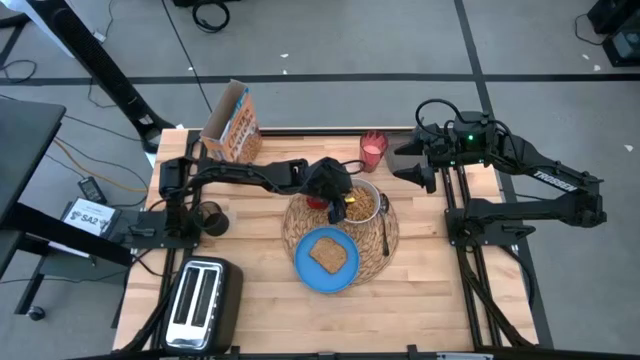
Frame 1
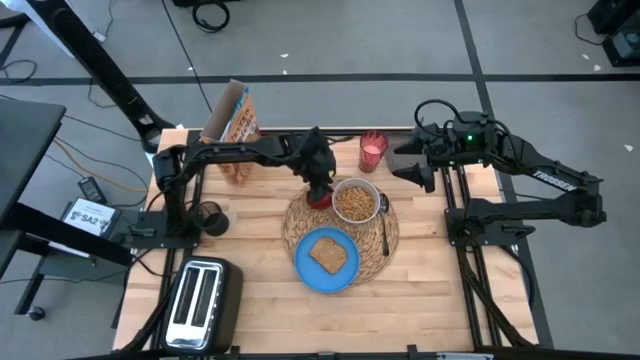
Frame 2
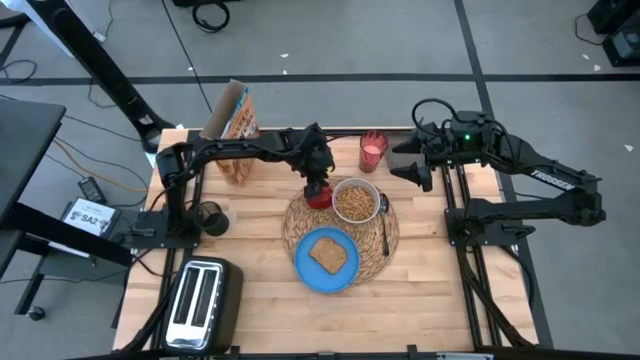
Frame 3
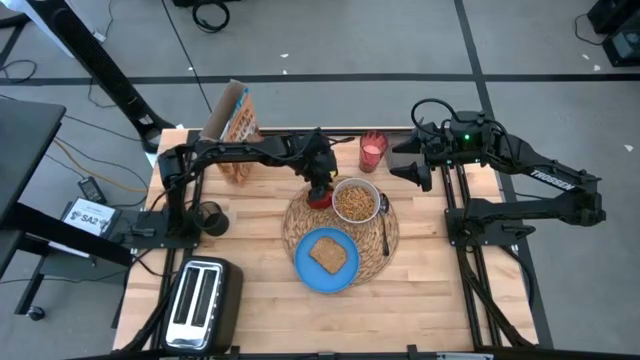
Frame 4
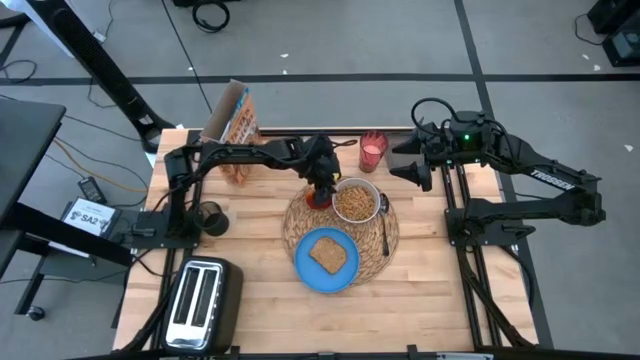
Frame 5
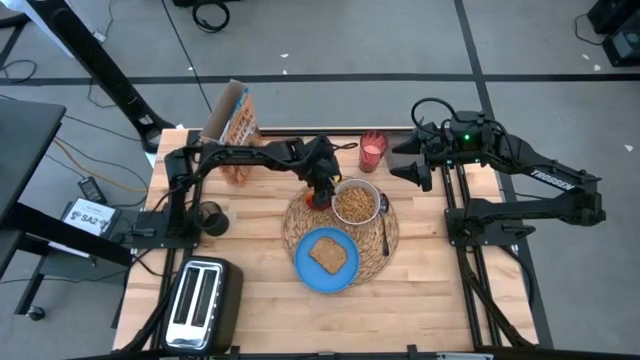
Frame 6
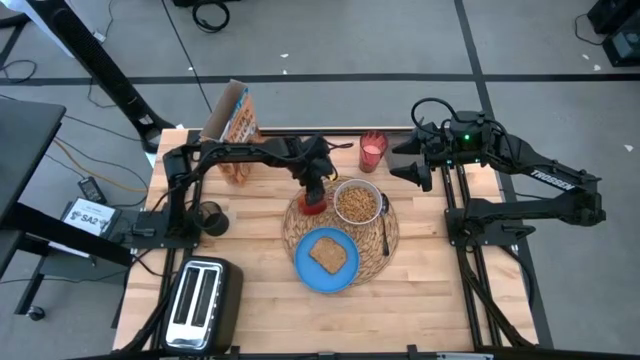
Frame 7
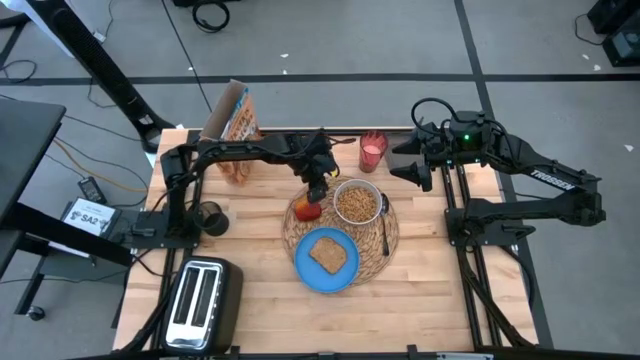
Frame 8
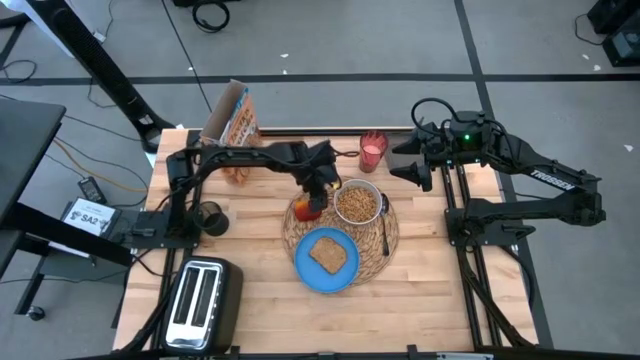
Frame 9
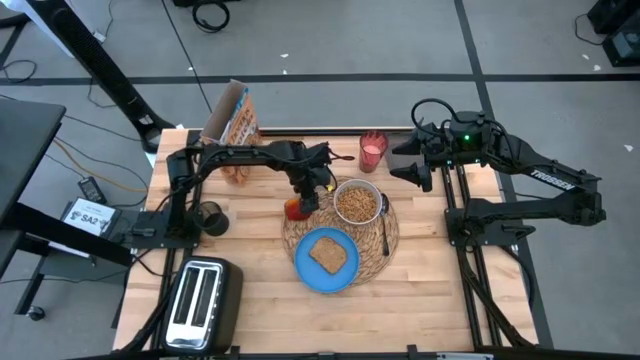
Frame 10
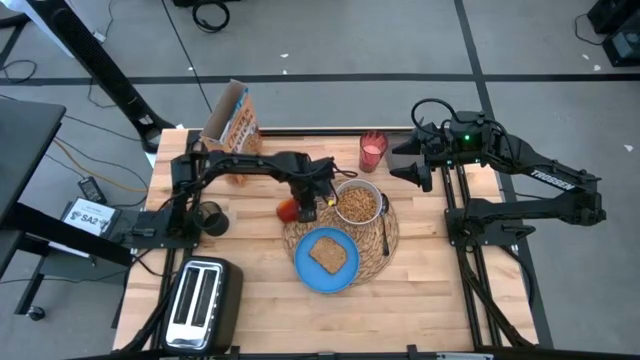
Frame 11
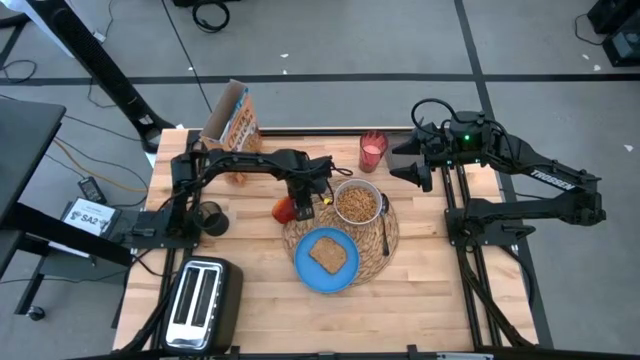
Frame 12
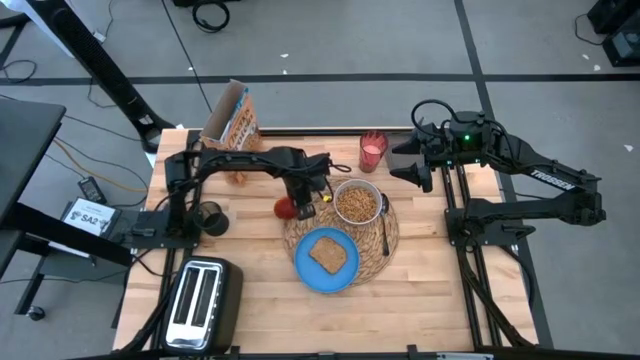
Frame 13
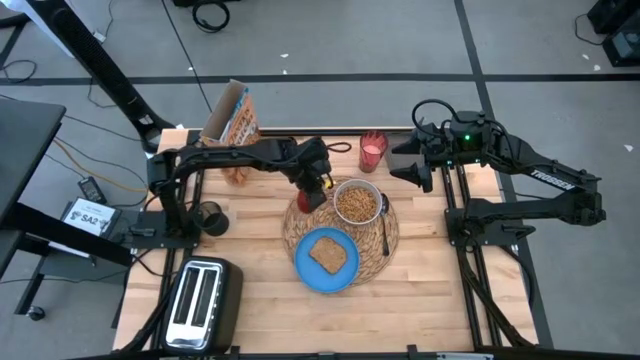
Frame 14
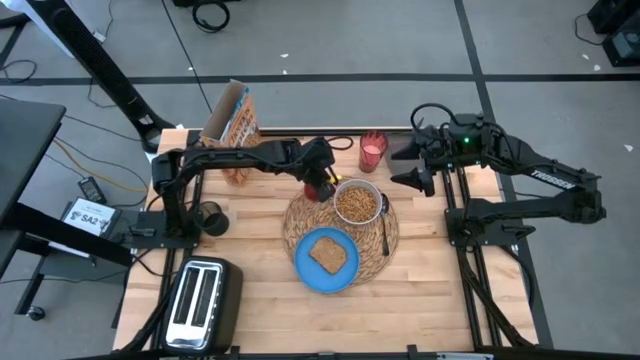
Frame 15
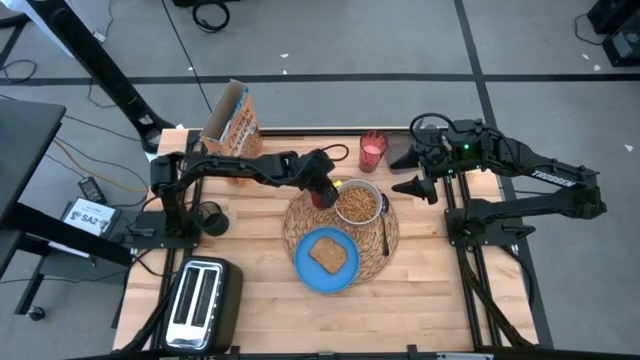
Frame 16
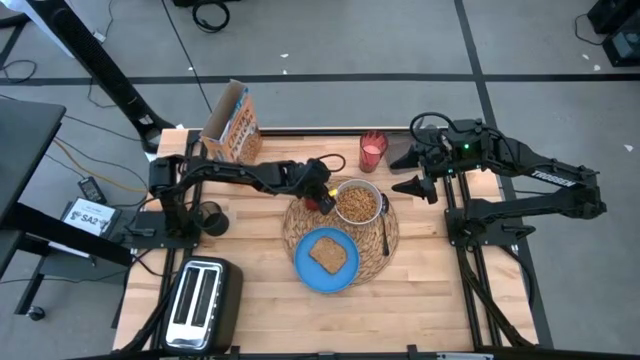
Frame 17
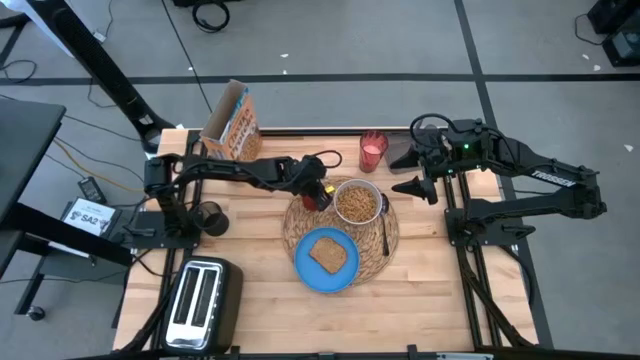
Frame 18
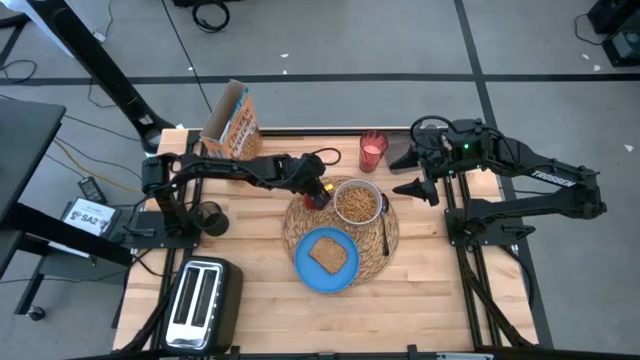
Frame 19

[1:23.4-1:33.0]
Task: Arrange a breakfast setting
Adjust the apple

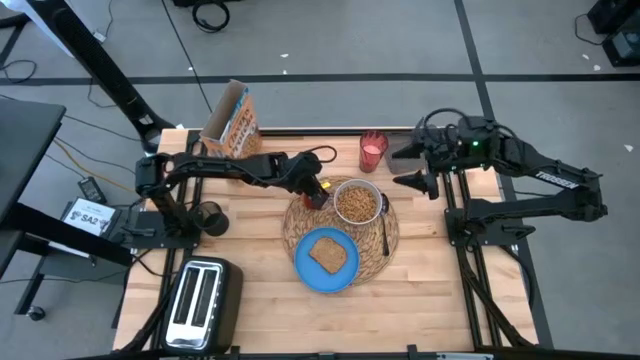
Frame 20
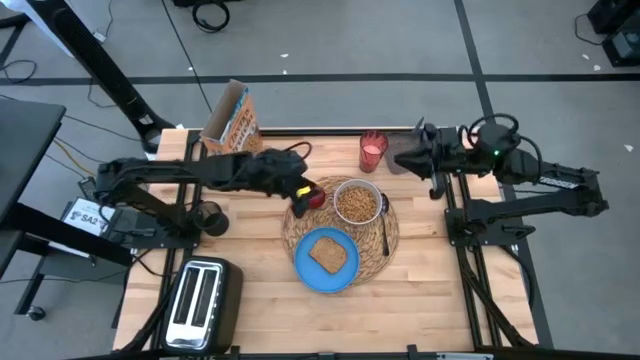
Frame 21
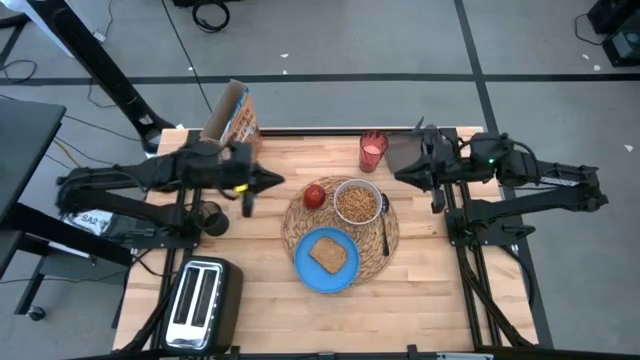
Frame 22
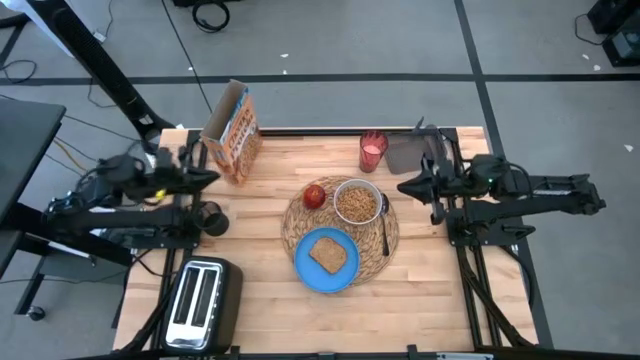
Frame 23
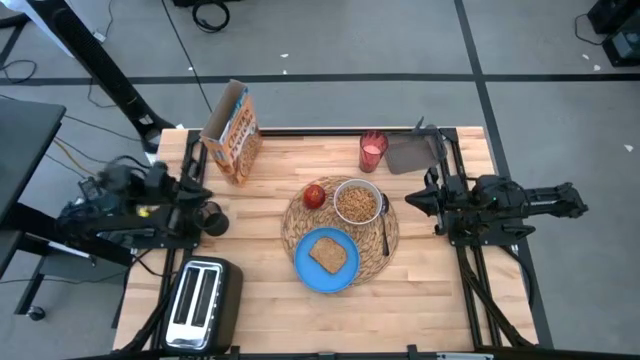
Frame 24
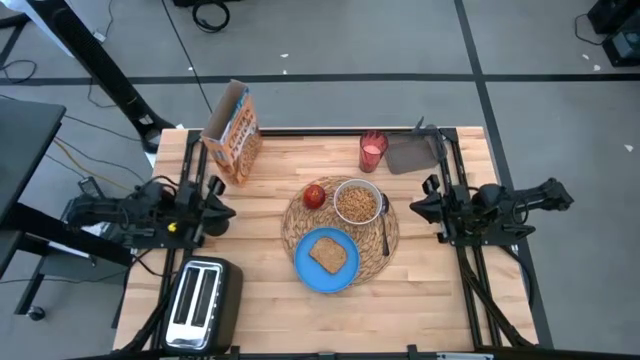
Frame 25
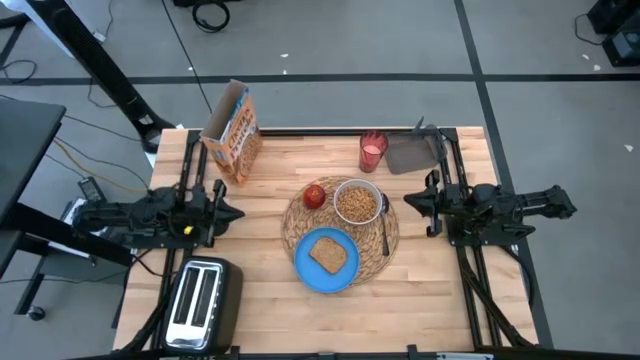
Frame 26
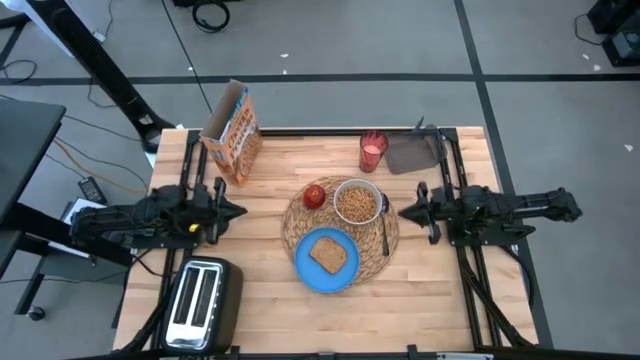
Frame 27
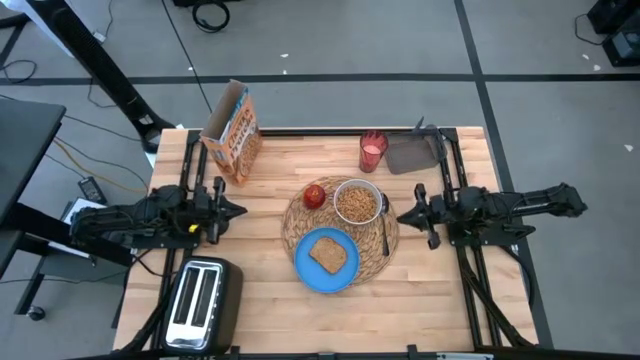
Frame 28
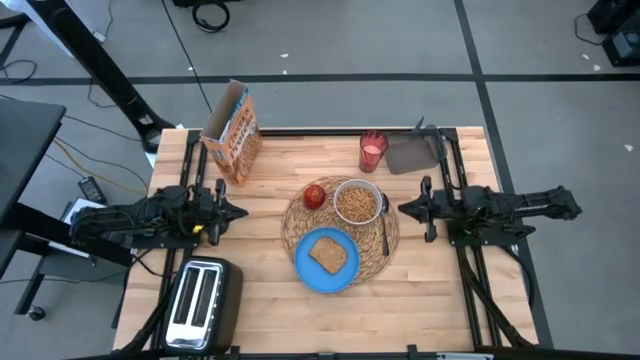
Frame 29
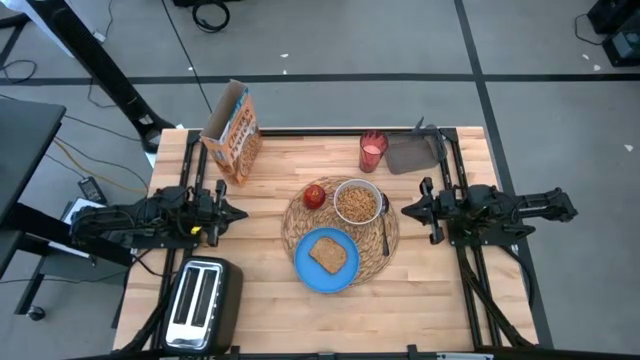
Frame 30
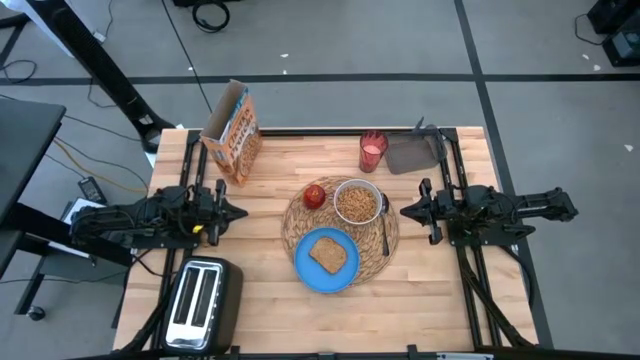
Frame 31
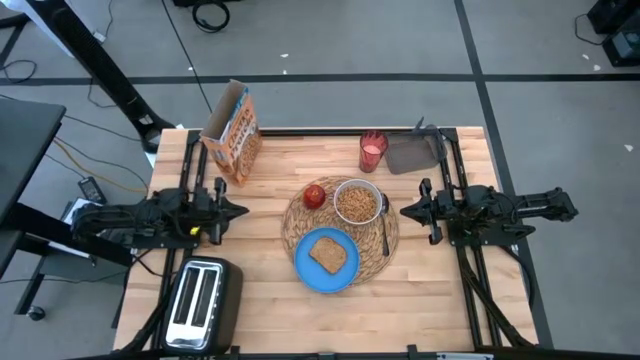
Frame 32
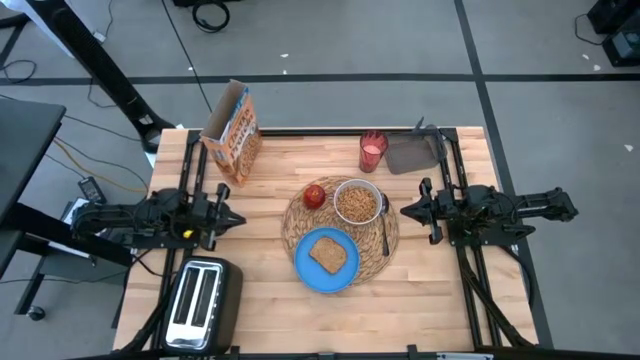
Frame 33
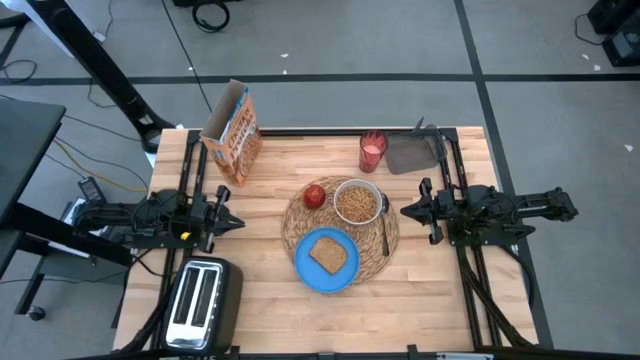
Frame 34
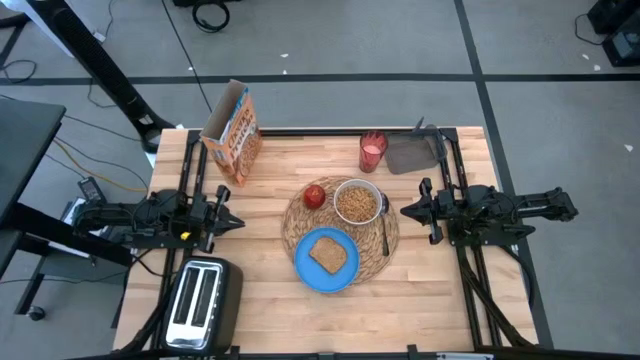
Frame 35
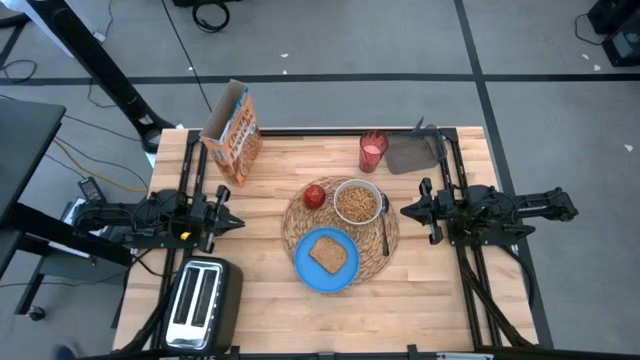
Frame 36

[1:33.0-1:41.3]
Return to Home Position

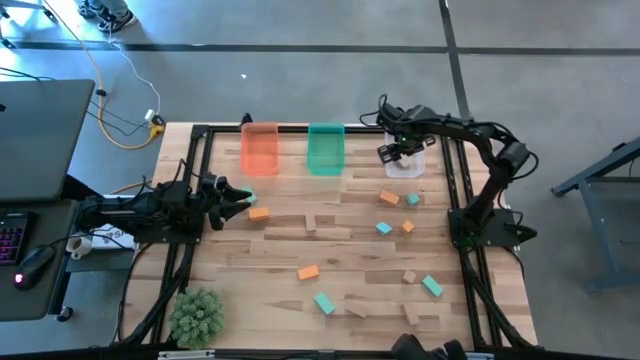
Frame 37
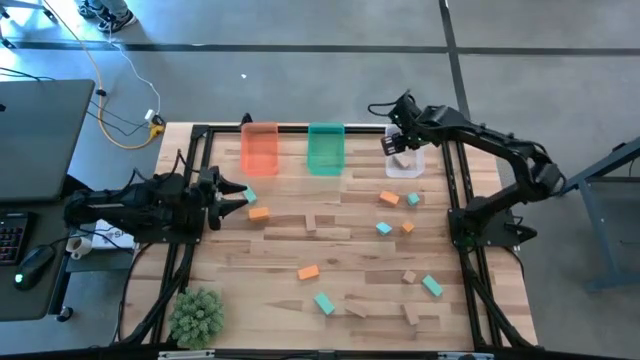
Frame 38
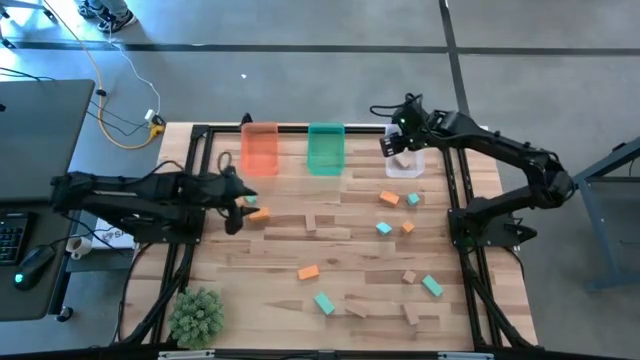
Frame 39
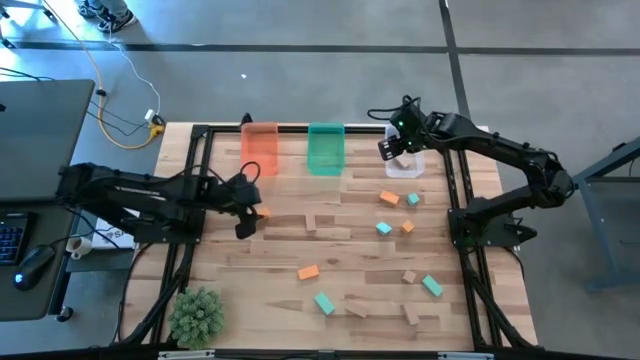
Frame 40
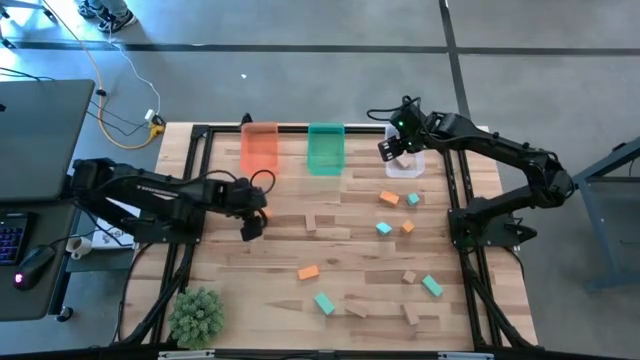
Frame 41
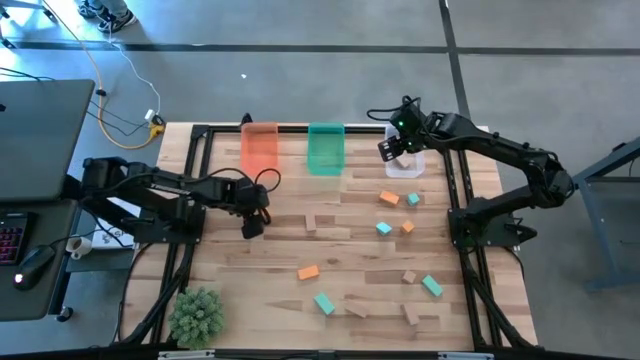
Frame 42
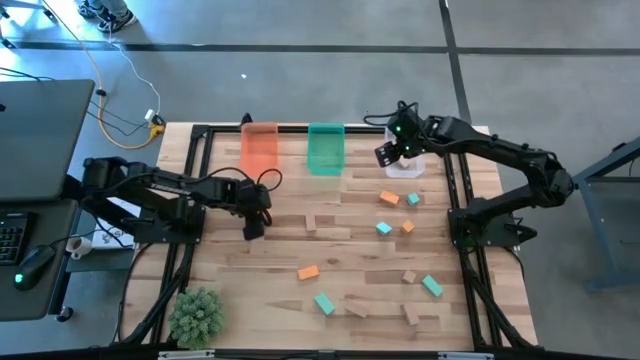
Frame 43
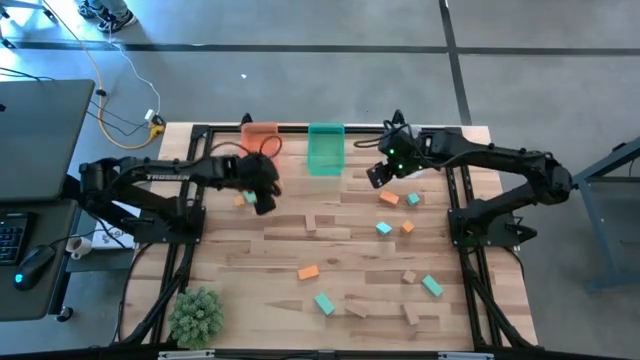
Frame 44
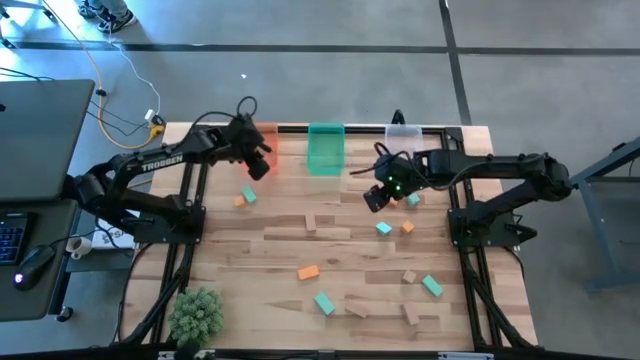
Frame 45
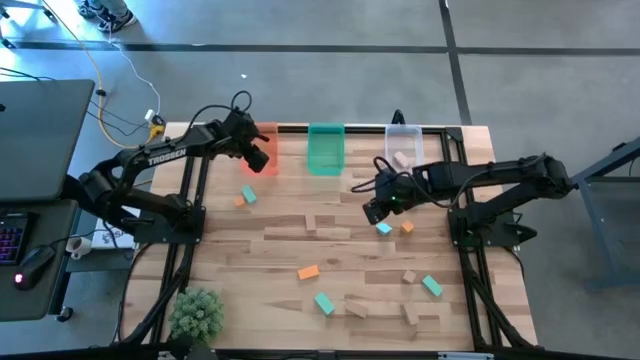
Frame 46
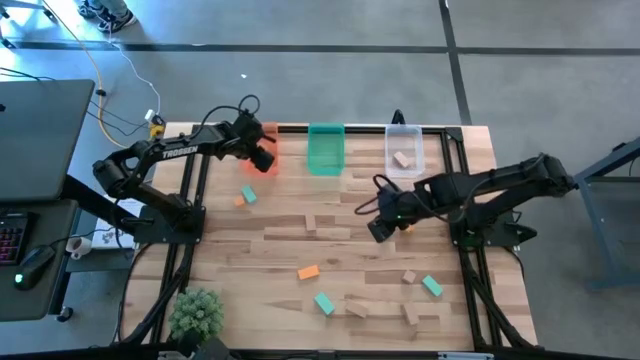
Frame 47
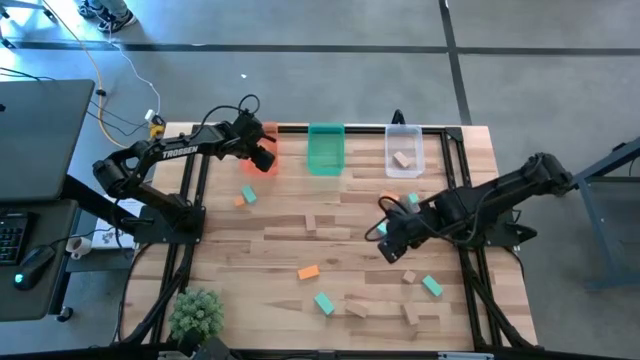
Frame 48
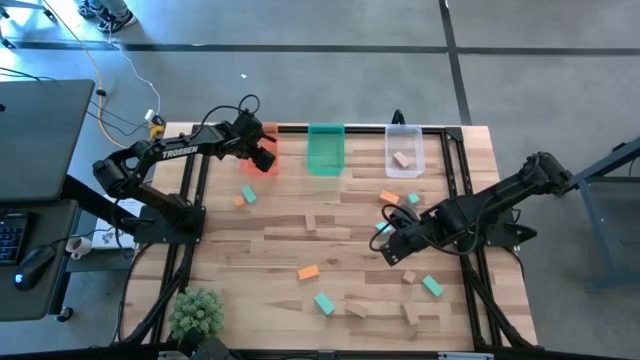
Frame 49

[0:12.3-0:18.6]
Task: Sort & place blocks by color
Put the orange block into the orange bin
